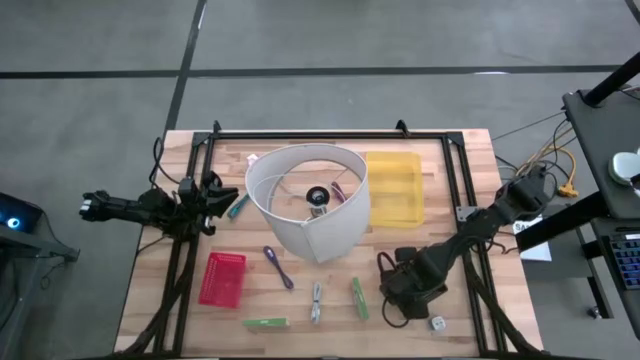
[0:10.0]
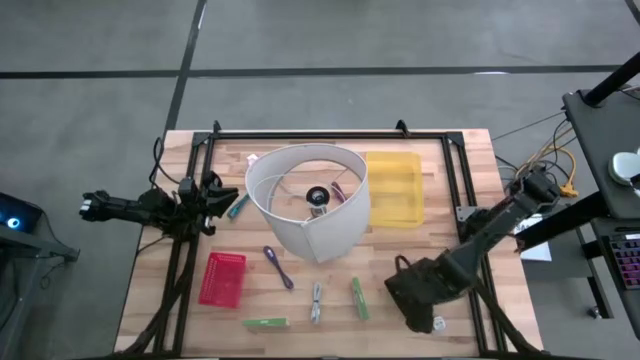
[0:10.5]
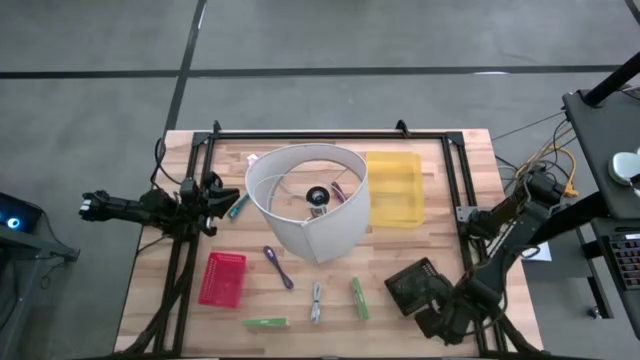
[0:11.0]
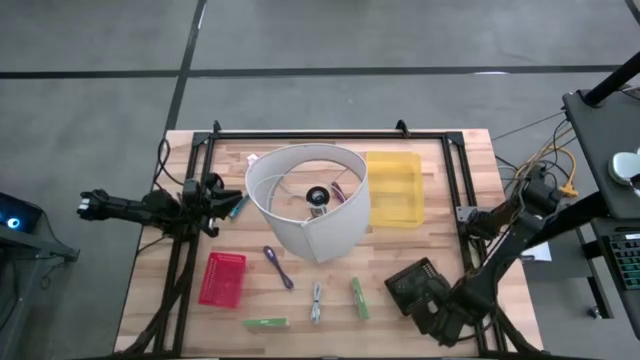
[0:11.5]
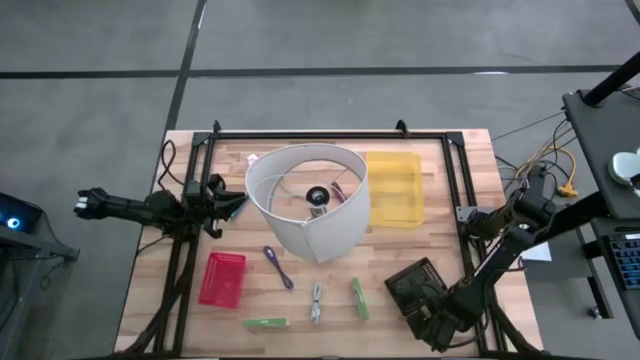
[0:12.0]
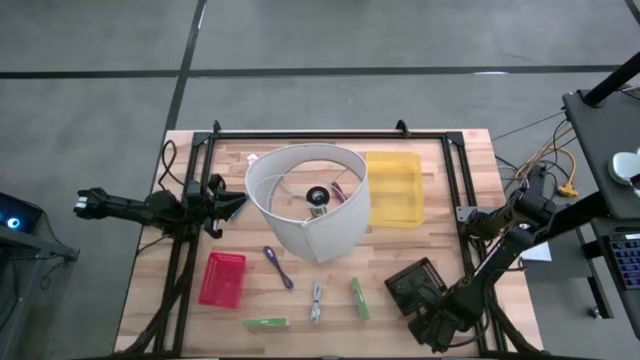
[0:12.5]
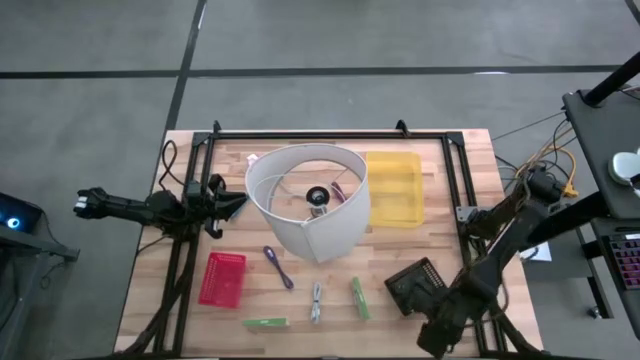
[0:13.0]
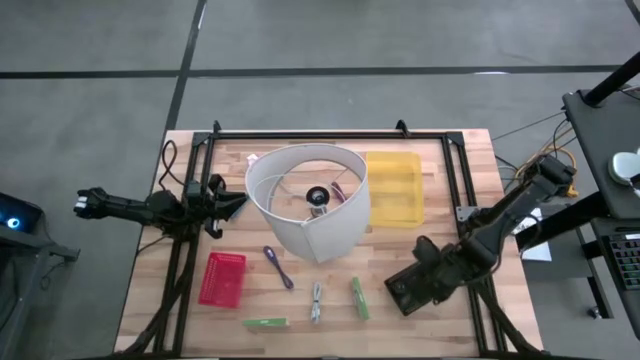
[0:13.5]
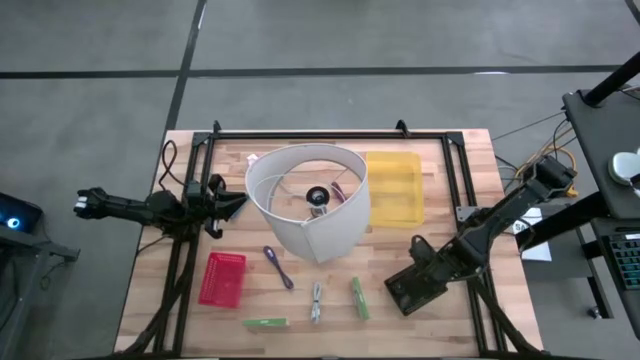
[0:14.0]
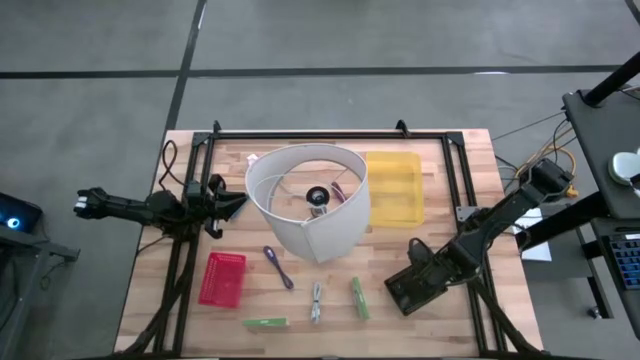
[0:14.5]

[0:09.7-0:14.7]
Task: Pick and place items into bin
Put the blue charger adapter into the black bin

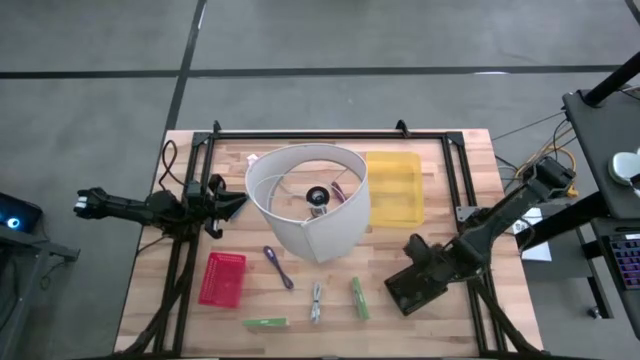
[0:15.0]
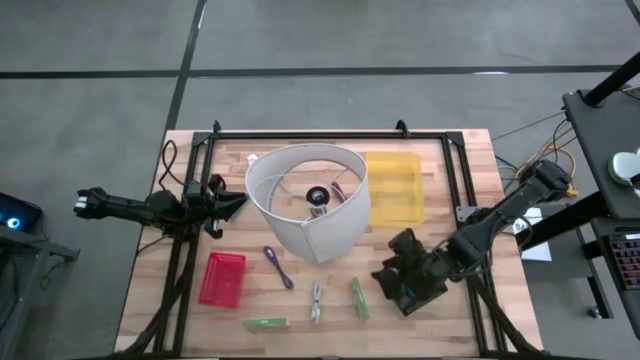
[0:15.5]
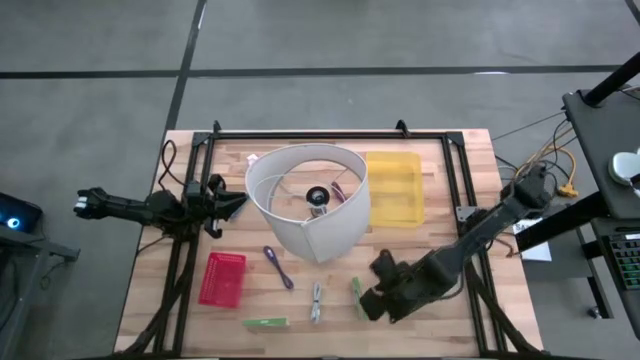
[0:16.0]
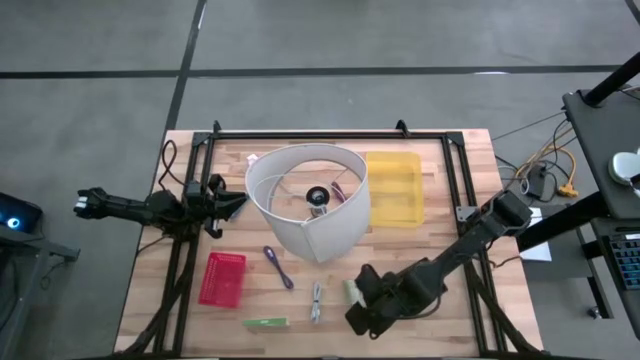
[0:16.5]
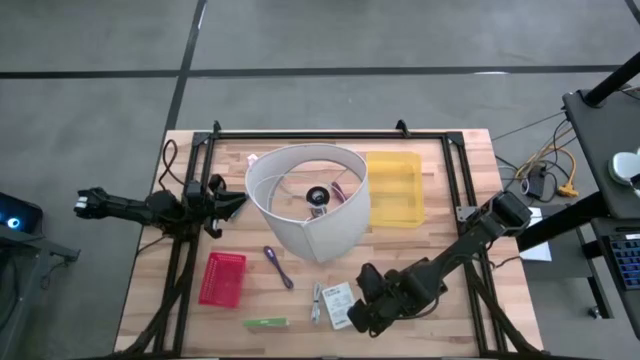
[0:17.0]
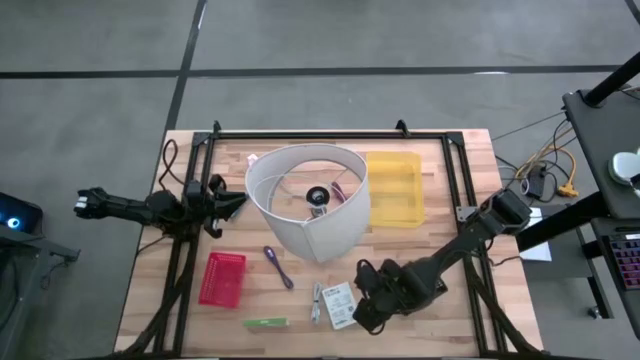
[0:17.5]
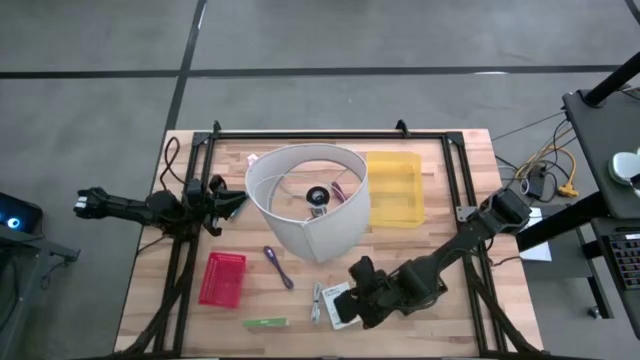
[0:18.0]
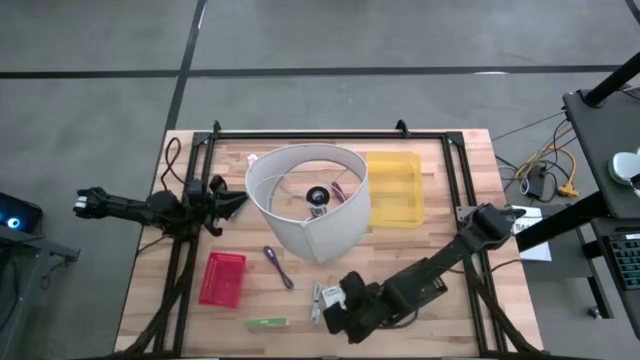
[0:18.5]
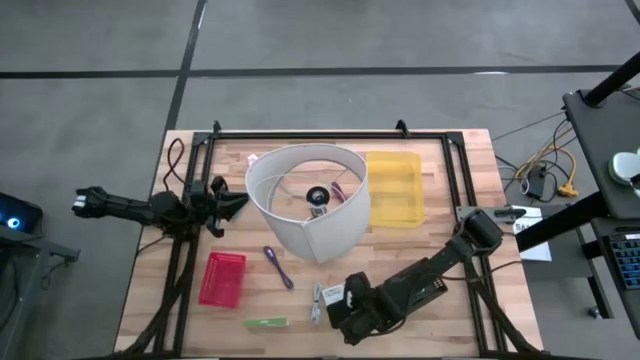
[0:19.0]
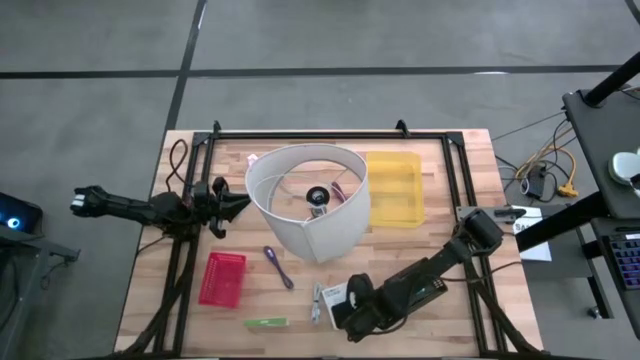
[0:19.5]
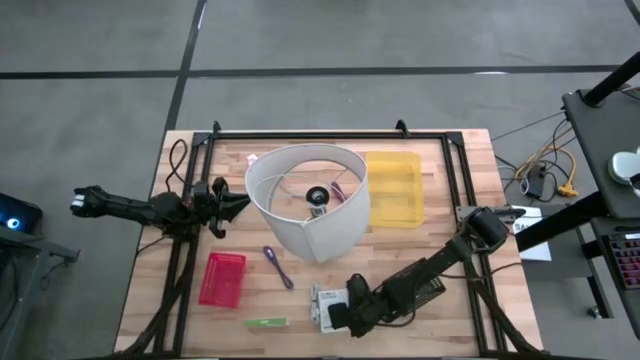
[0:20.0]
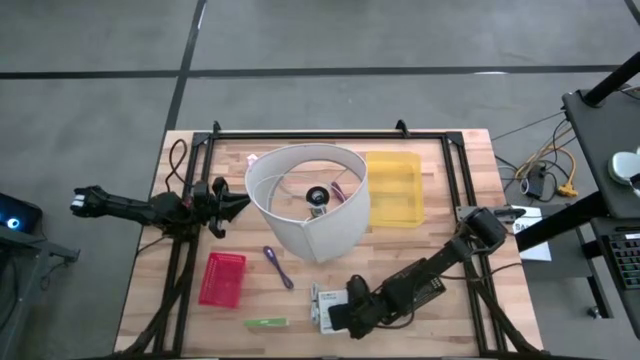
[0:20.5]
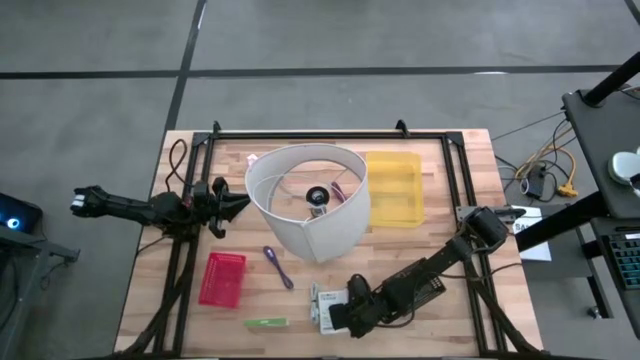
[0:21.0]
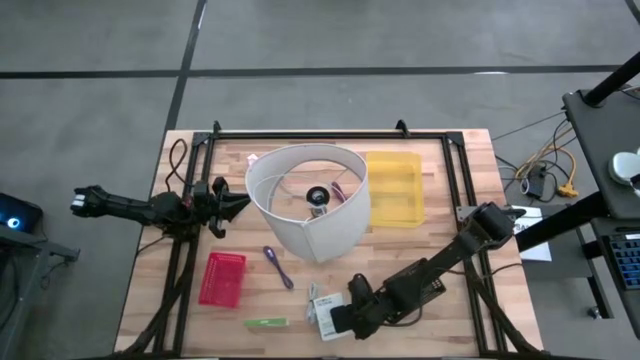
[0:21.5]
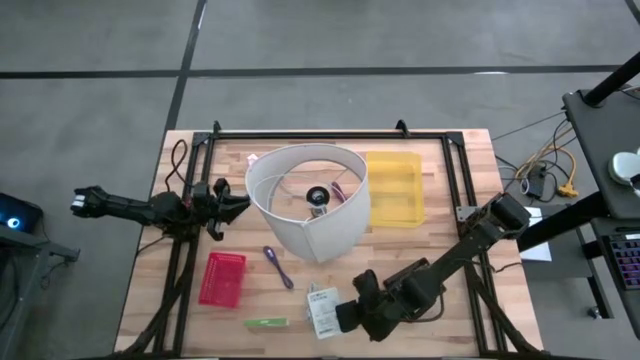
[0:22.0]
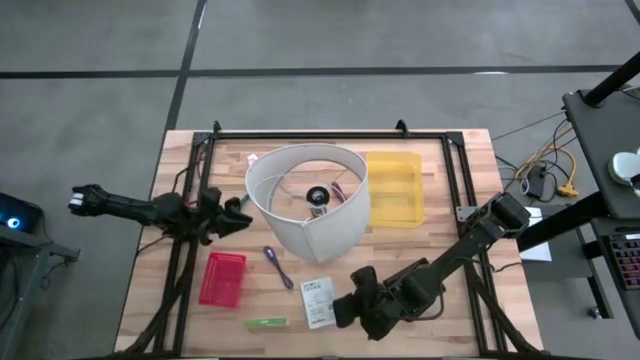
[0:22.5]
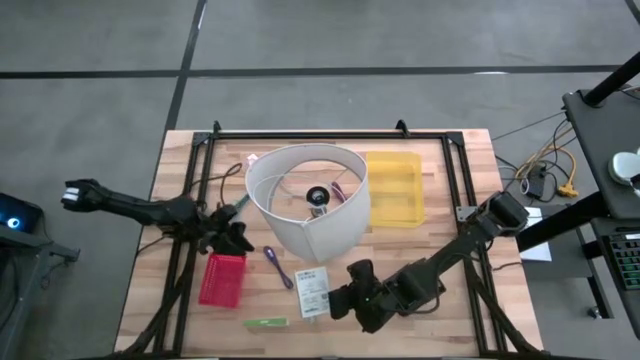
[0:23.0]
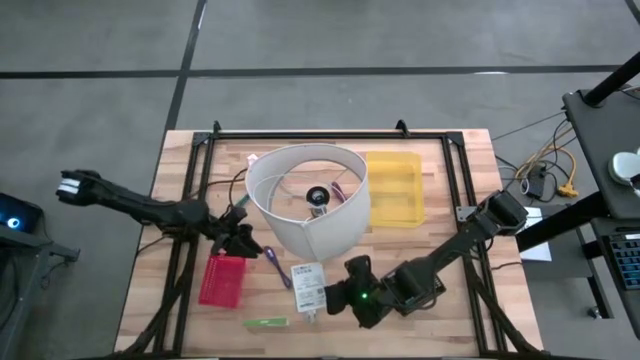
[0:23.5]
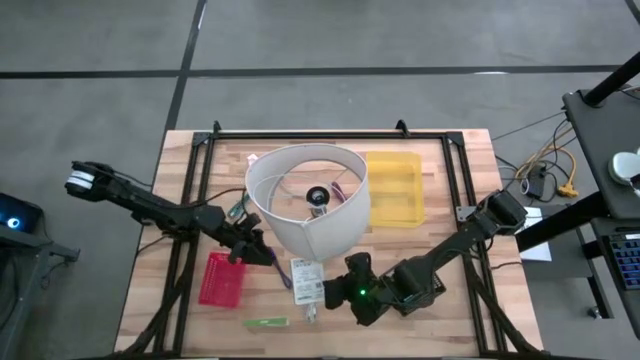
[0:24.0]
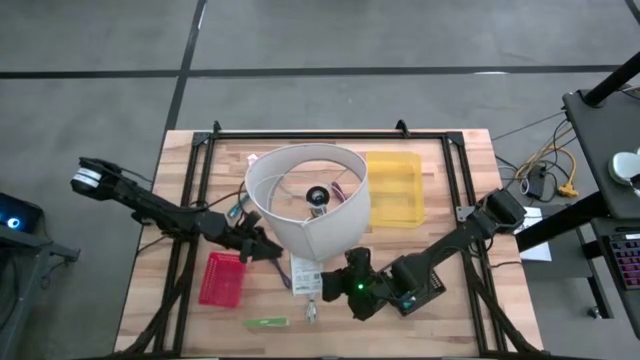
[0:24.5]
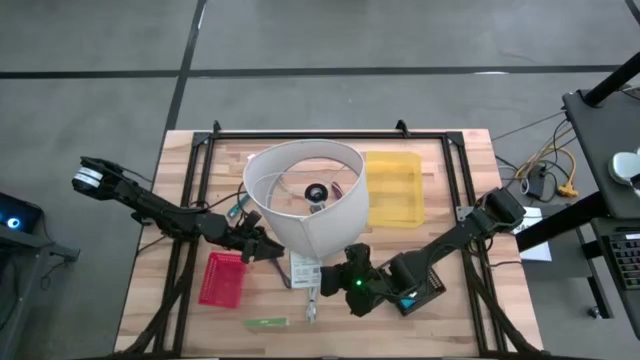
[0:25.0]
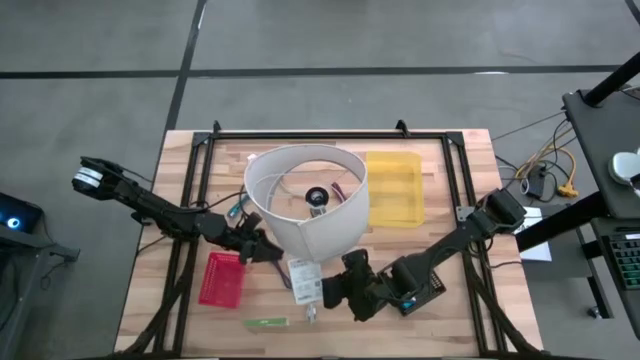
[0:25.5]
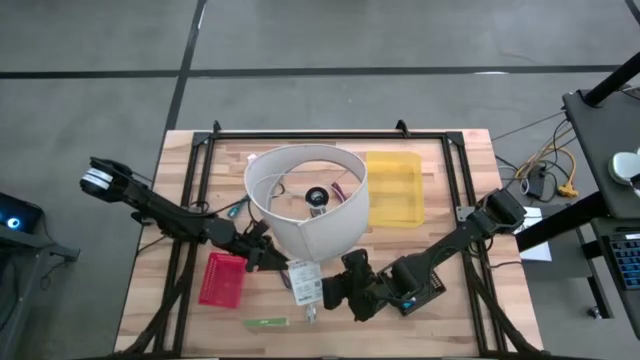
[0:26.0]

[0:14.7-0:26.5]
Put the right card reader box into the red bin

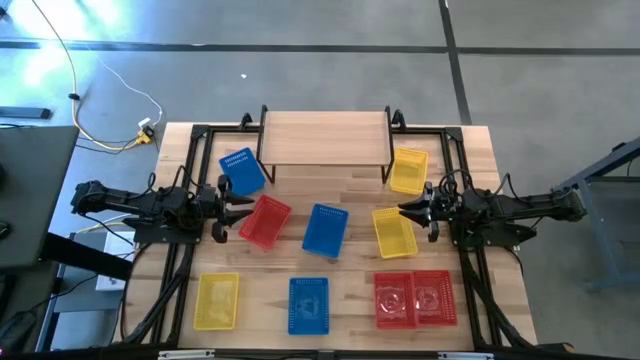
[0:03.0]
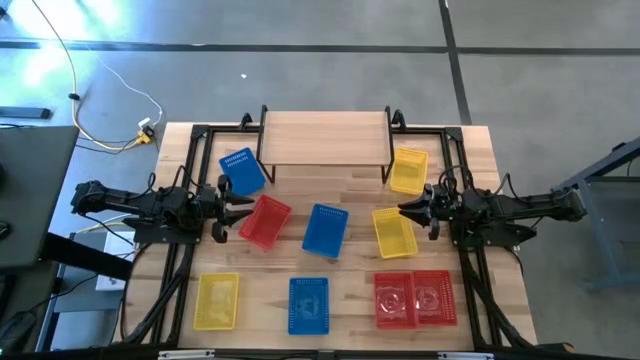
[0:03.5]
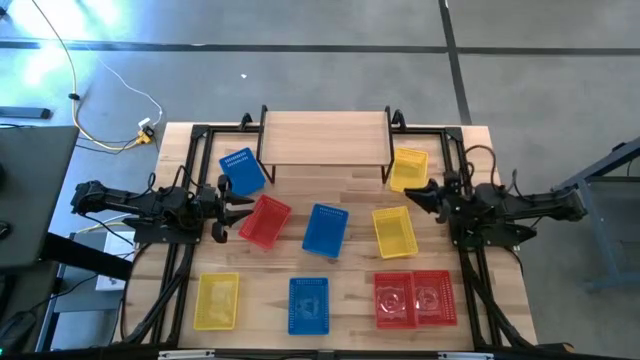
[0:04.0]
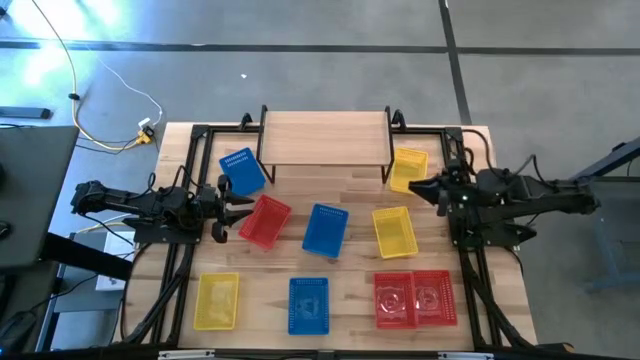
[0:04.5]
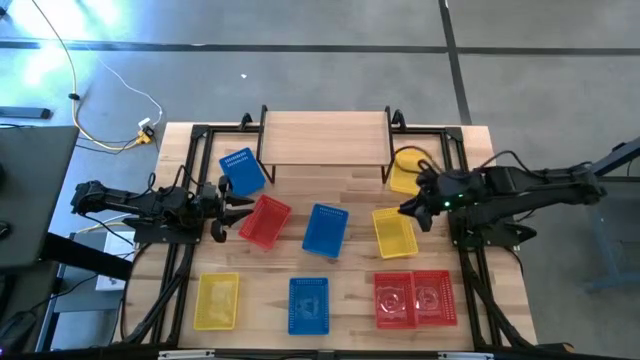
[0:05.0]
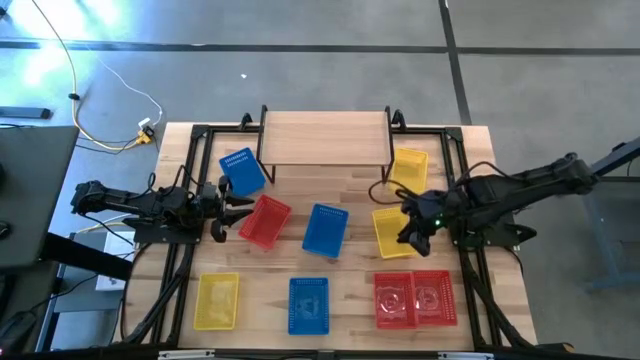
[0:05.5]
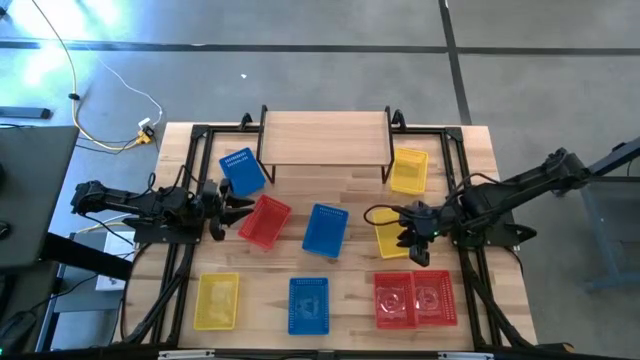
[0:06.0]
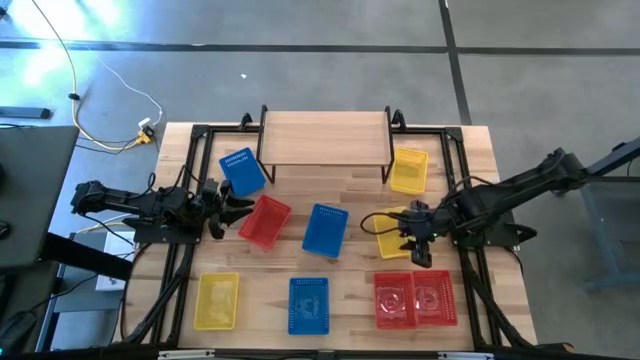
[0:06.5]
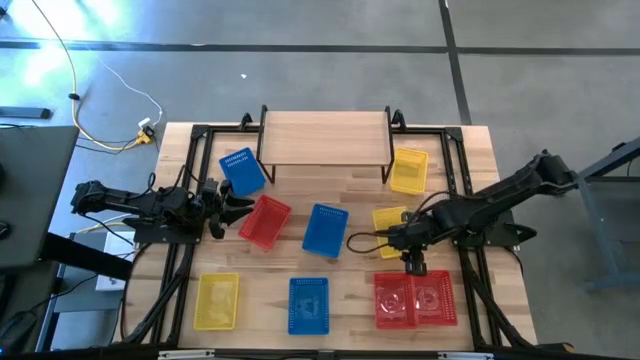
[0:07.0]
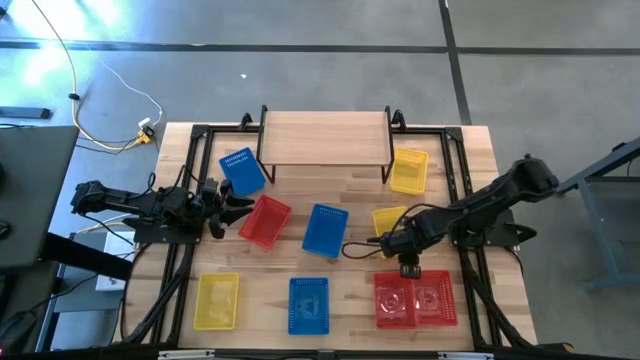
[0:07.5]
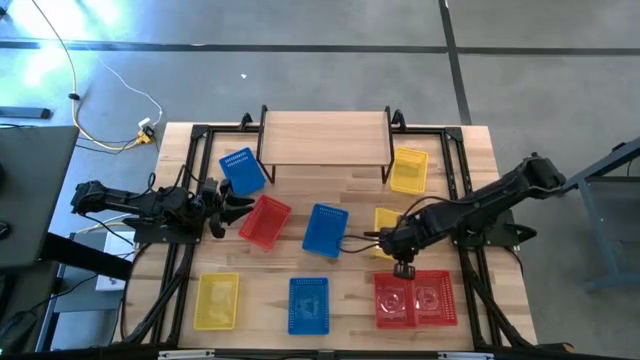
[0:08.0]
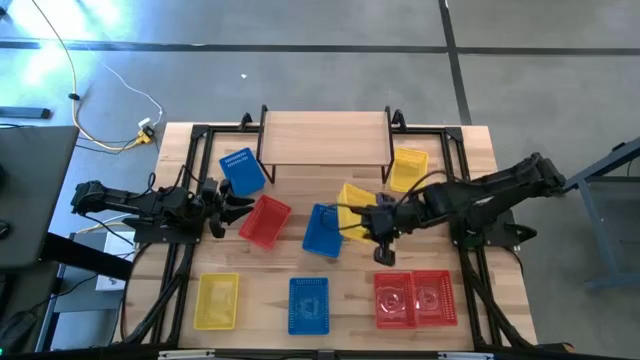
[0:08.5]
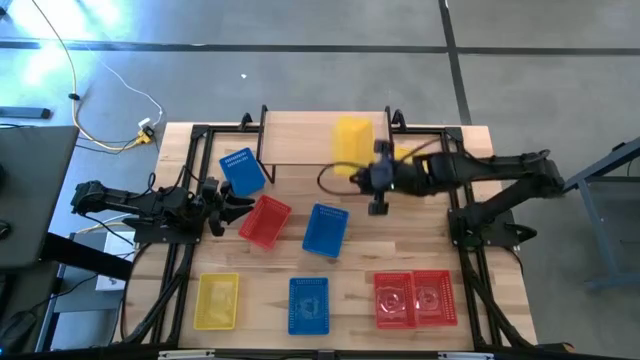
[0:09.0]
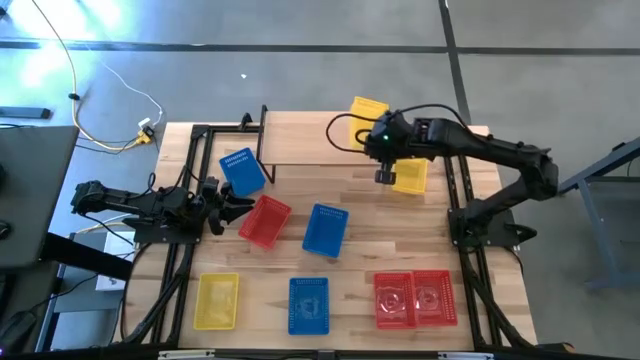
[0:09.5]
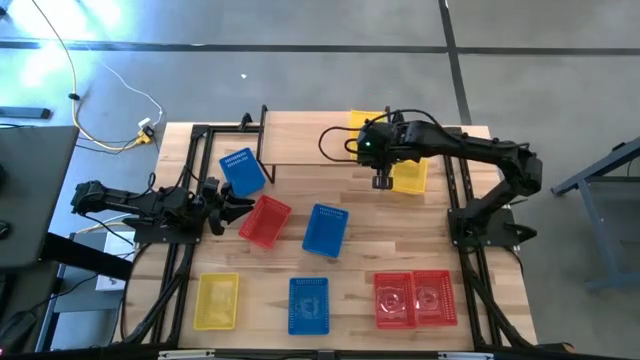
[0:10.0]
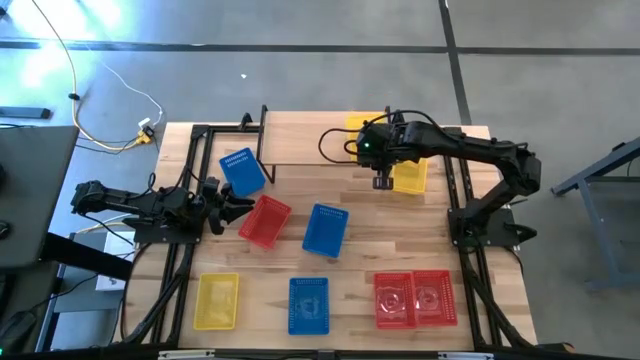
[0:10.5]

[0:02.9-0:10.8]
Task: Stack baskets on shelf by color
Put the middle yellow basket on the shelf
